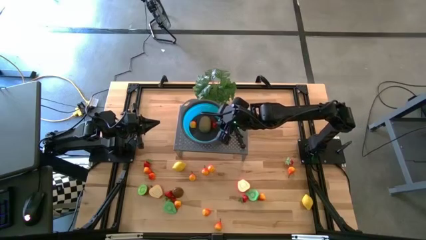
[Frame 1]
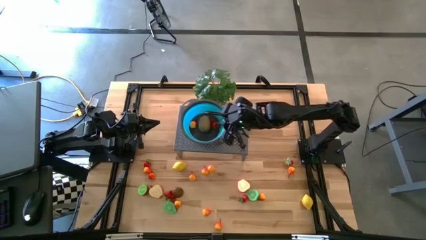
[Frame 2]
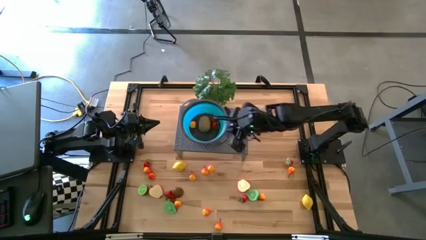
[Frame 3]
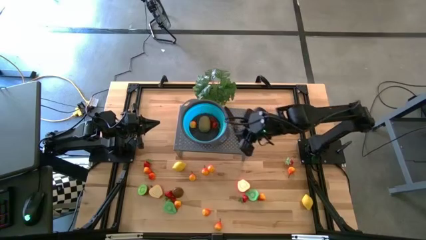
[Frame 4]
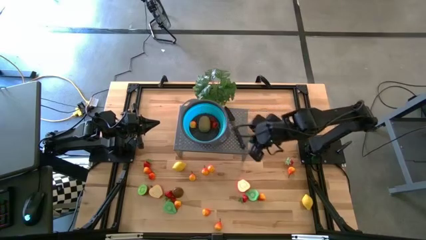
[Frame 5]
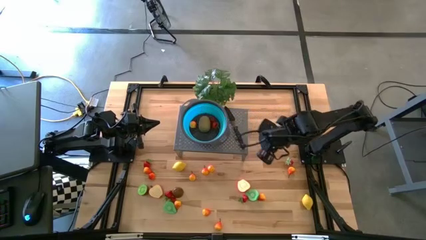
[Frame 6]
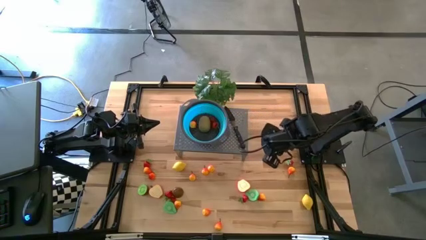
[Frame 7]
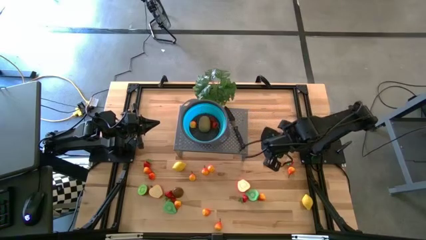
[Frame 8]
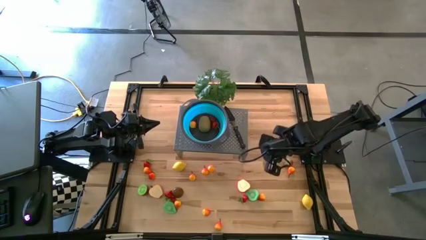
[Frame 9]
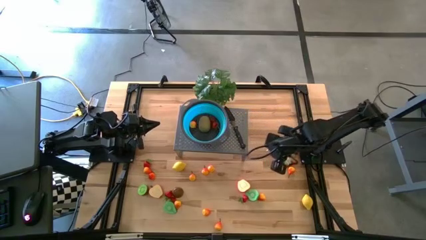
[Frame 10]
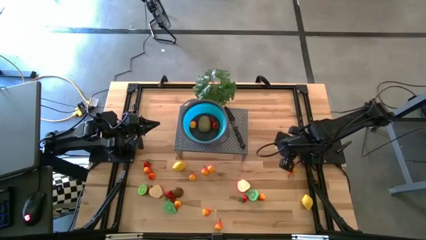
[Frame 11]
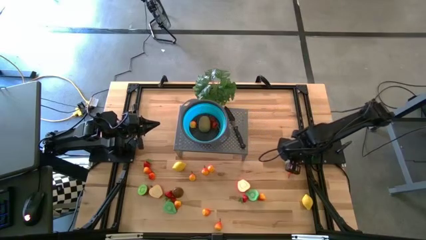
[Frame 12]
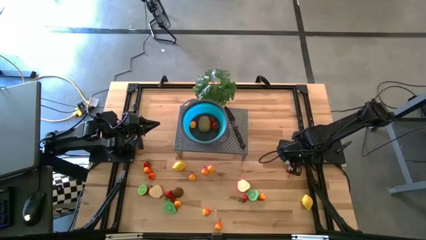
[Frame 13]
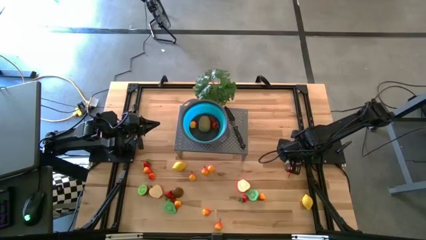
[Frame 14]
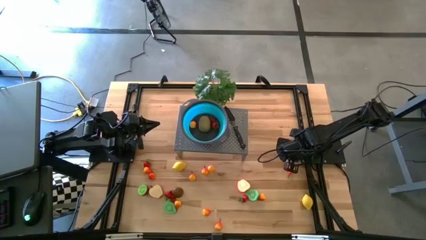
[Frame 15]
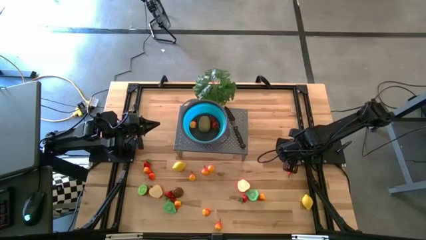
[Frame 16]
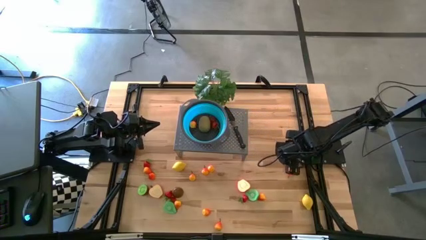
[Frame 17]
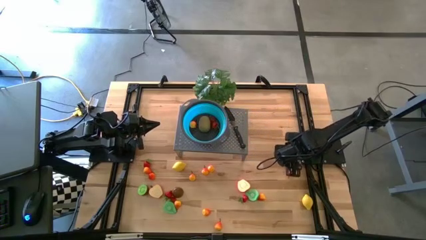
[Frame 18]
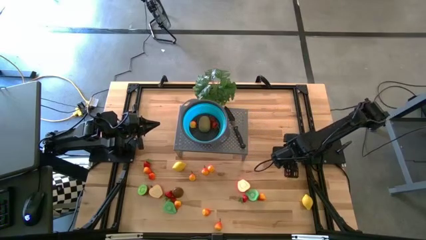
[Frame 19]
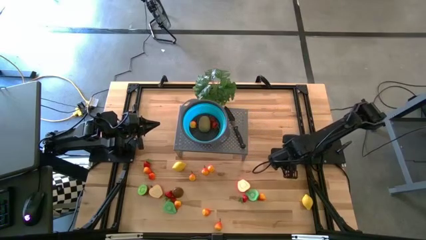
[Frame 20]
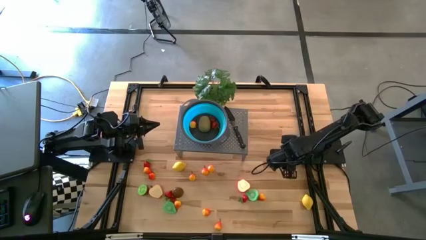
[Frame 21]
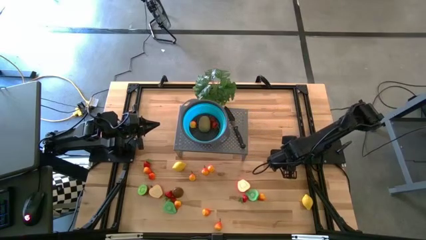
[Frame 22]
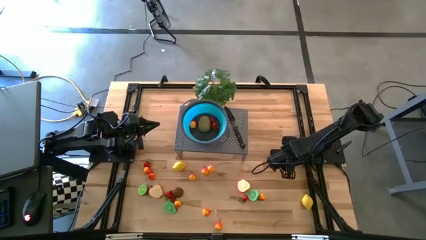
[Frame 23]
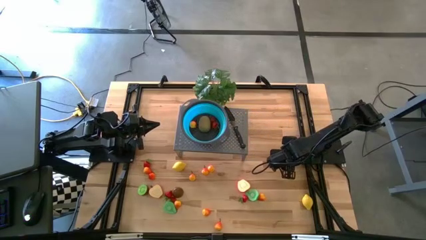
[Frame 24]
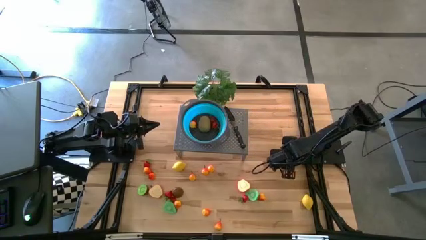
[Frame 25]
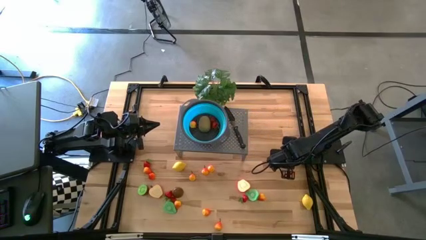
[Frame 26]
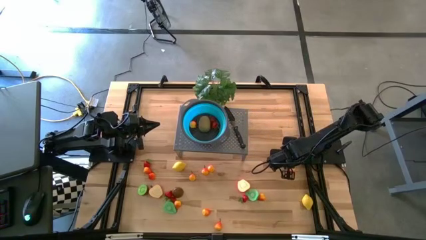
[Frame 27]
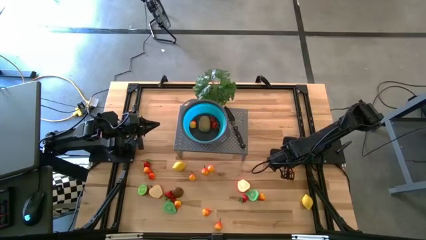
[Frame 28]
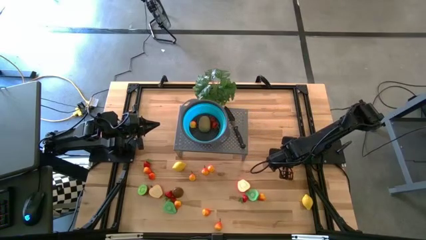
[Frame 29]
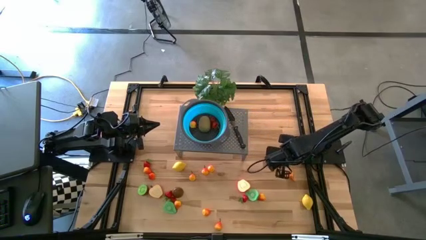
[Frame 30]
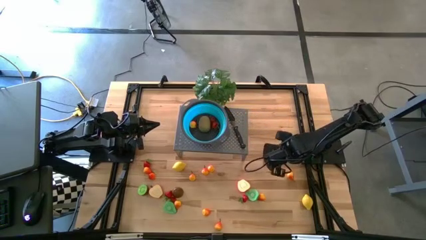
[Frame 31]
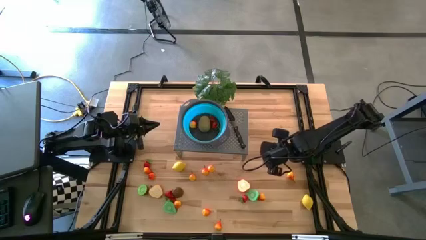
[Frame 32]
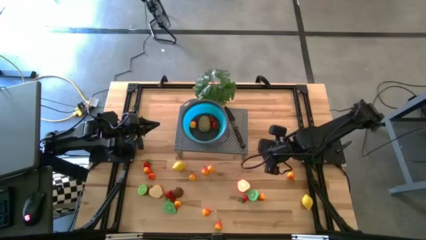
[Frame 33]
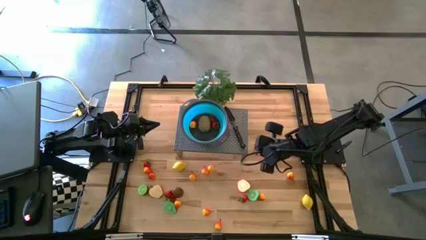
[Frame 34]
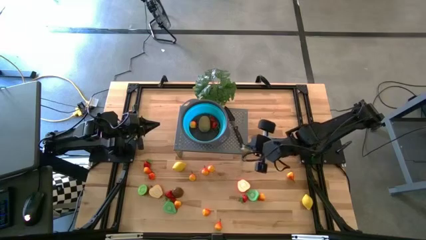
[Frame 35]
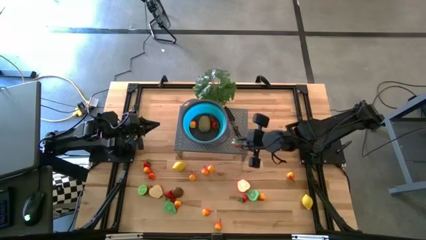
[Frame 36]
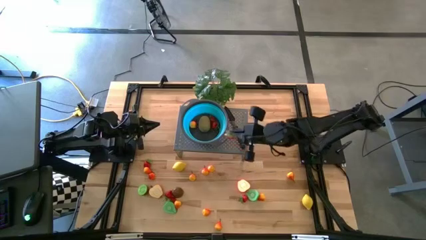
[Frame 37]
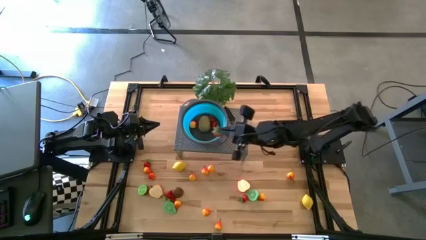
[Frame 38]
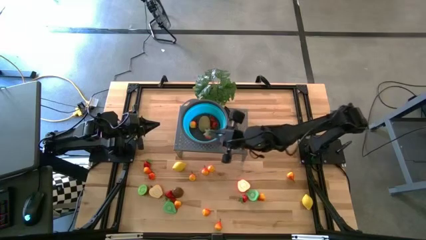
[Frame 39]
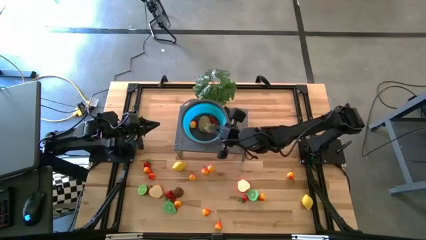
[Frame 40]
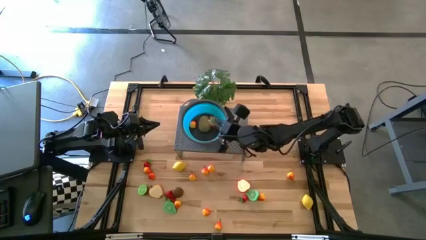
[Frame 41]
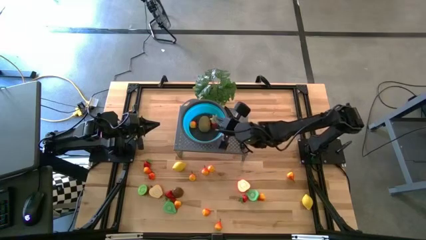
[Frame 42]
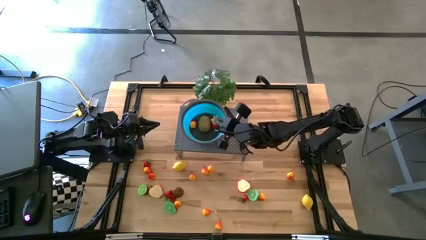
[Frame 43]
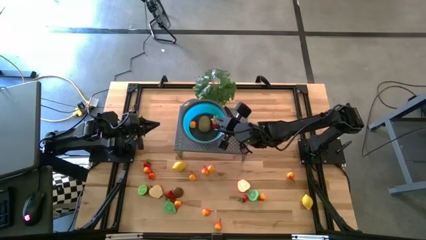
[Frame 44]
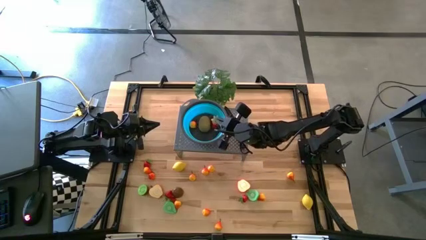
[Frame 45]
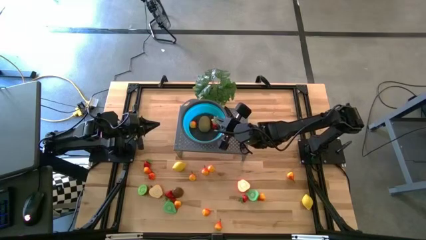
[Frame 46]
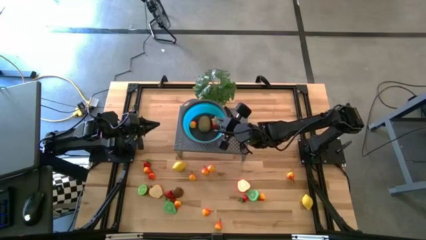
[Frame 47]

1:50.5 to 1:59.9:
Task: Pick & Place Fruit
Put the strawberry into the blue strainer bowl on the shelf

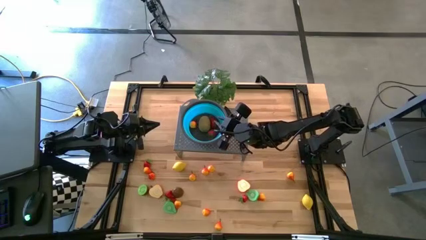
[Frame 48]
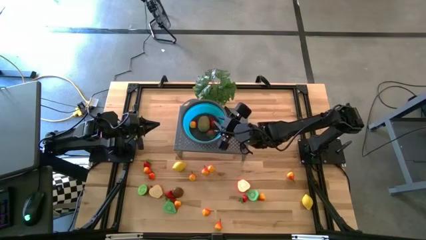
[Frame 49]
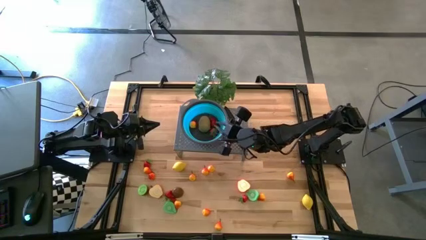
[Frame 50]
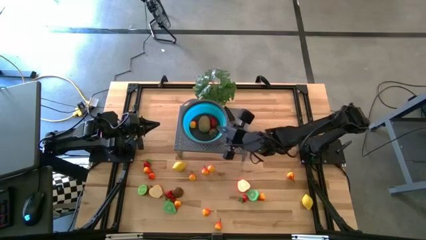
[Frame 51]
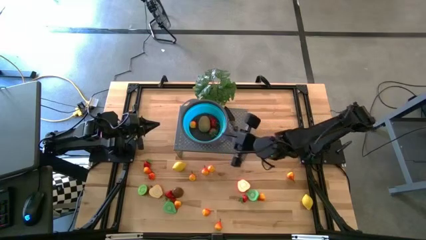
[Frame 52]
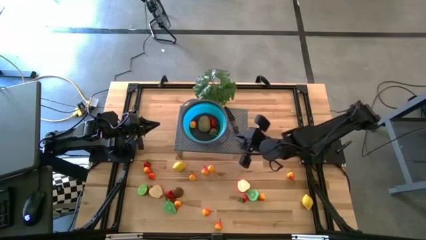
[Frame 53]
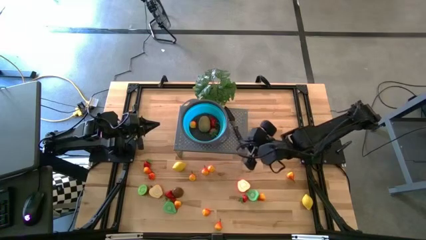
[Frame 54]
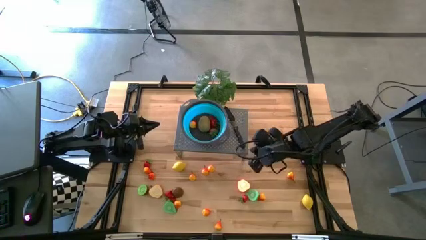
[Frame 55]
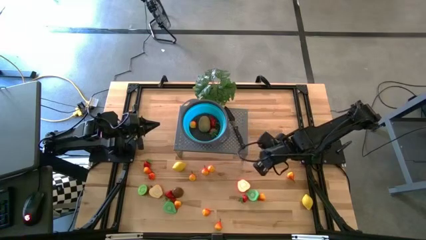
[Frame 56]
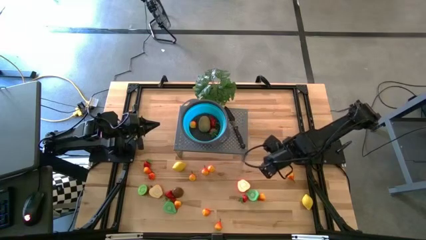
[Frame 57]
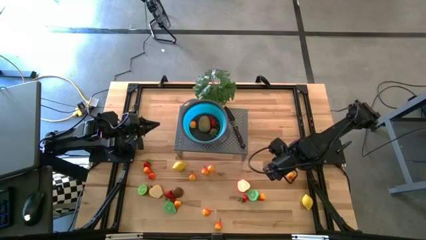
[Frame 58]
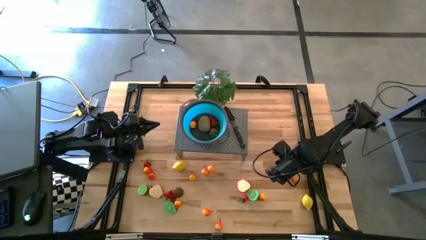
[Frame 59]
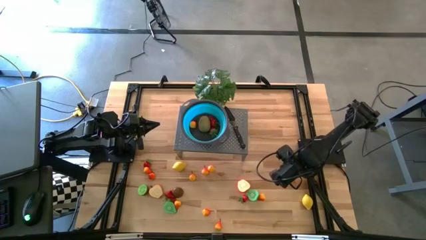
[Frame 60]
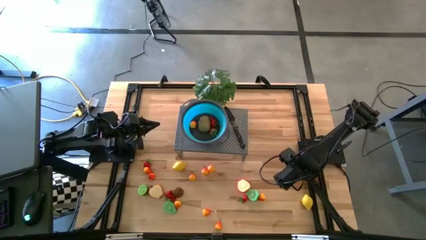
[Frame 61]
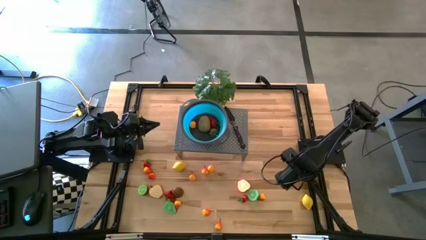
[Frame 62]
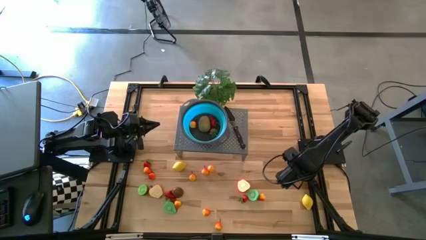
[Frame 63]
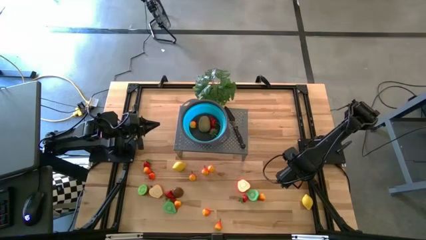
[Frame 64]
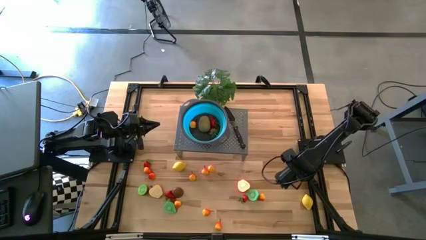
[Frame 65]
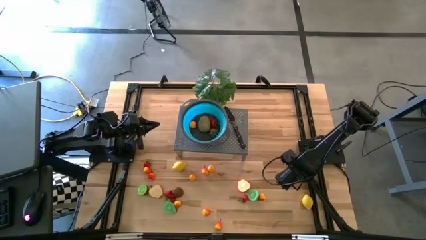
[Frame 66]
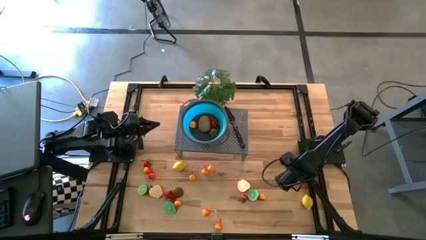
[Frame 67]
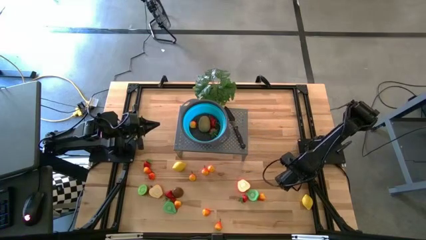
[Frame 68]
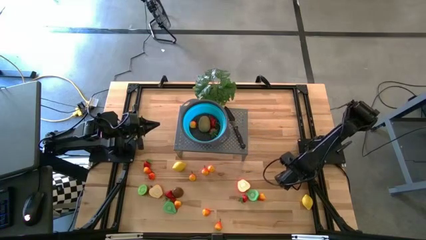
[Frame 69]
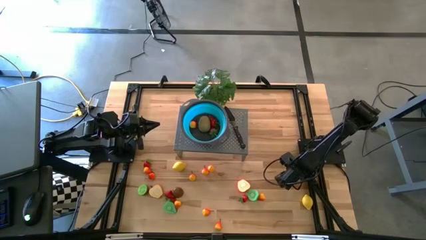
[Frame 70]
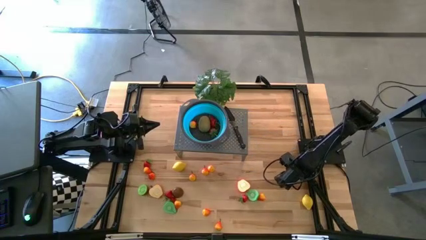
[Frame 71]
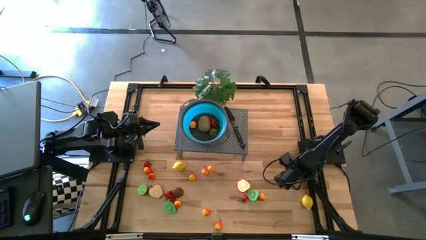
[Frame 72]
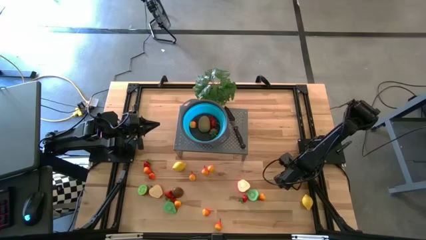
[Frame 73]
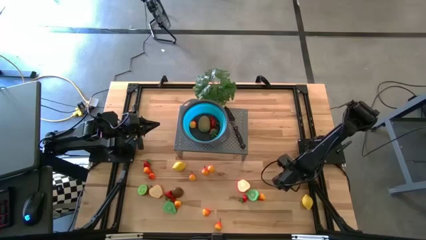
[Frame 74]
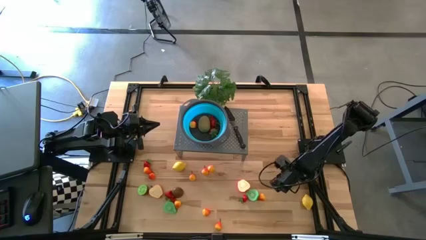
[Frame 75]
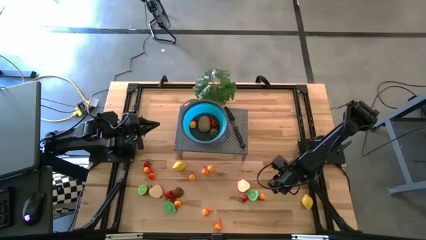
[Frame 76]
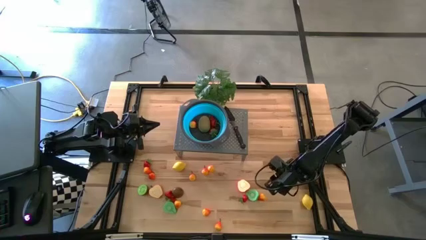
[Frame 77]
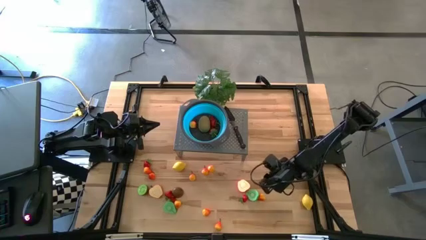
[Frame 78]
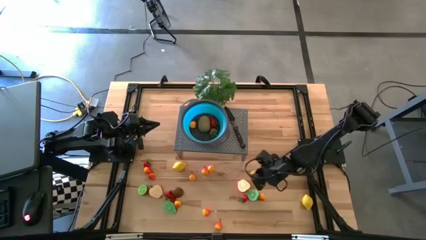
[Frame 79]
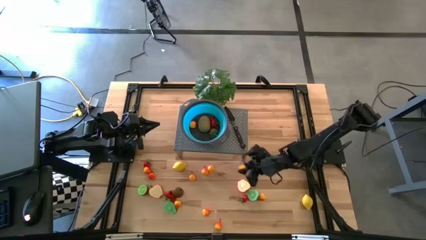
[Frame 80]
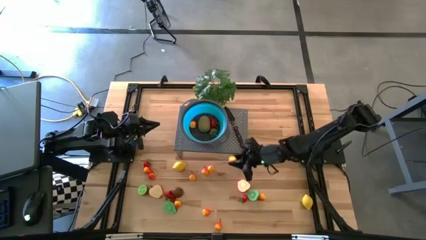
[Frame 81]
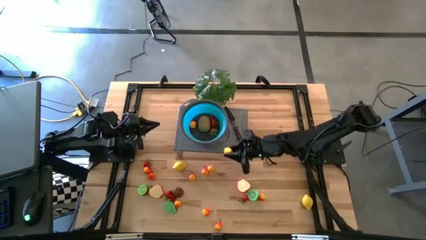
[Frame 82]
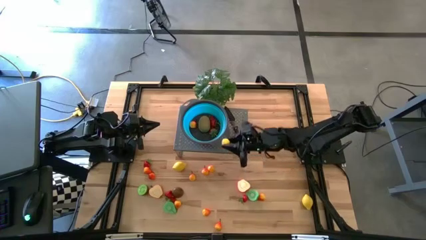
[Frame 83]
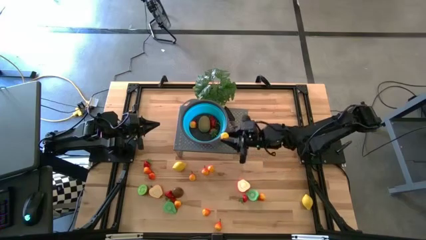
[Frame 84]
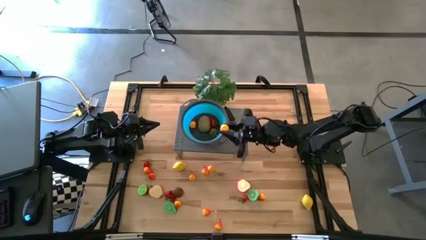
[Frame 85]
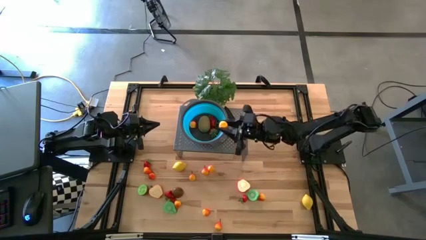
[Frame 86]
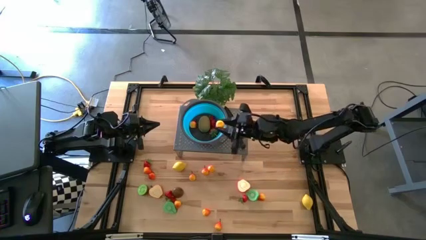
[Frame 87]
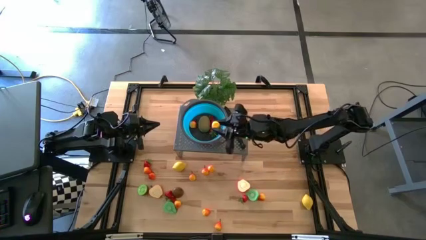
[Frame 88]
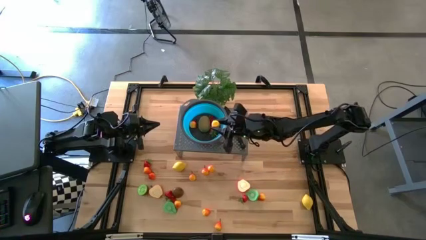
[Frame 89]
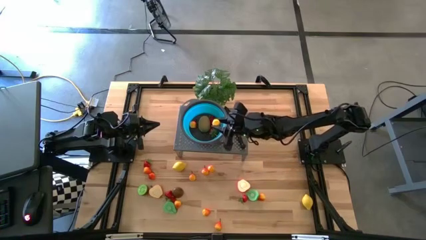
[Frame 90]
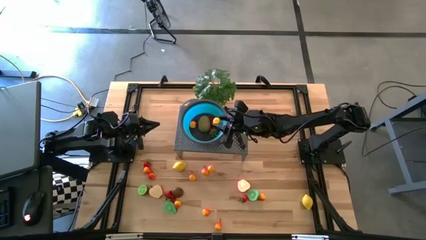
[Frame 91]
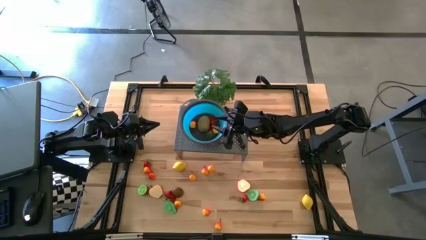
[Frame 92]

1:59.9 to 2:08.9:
Put the pear into the blue strainer bowl on the shelf
